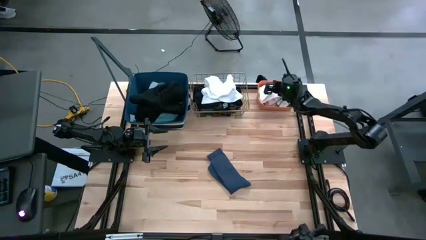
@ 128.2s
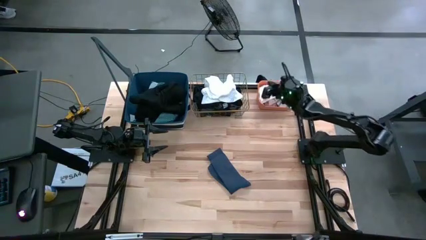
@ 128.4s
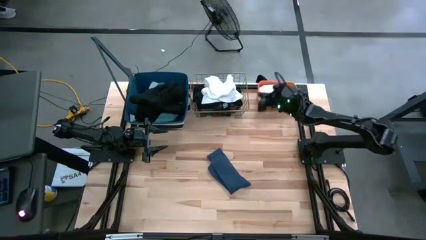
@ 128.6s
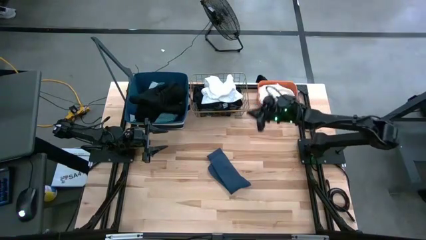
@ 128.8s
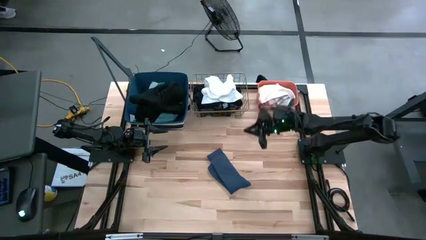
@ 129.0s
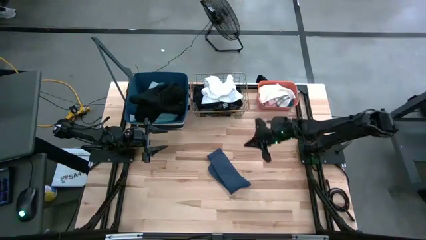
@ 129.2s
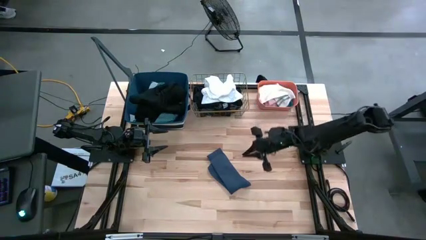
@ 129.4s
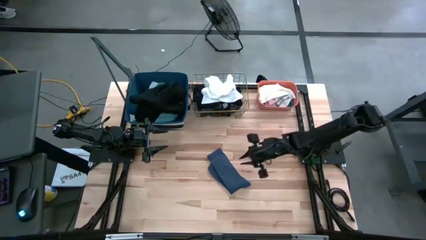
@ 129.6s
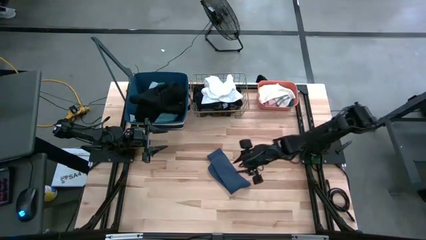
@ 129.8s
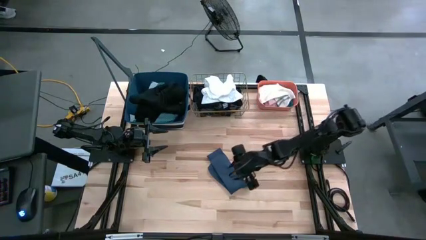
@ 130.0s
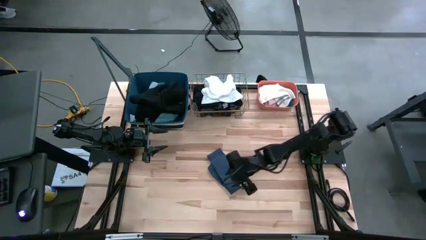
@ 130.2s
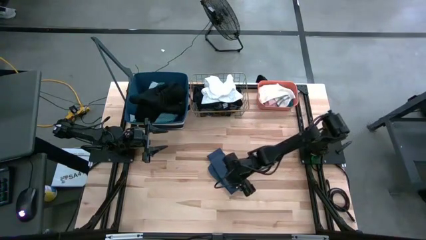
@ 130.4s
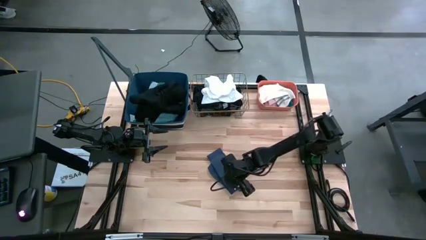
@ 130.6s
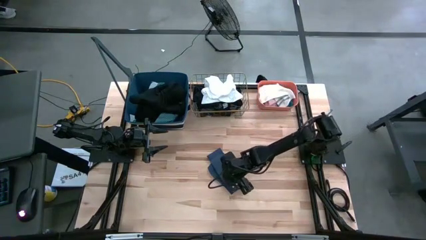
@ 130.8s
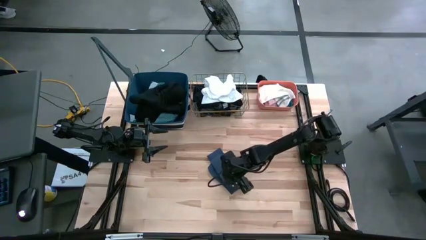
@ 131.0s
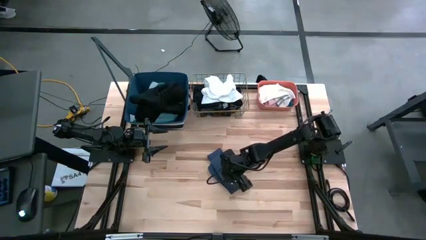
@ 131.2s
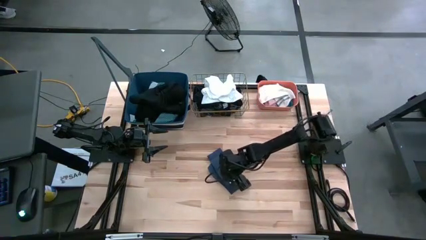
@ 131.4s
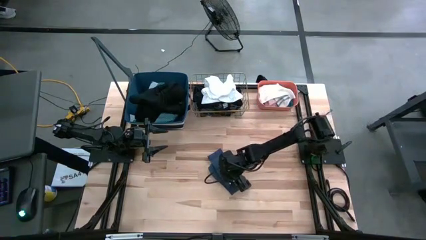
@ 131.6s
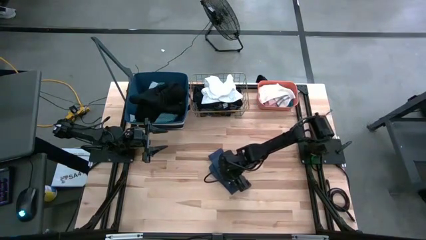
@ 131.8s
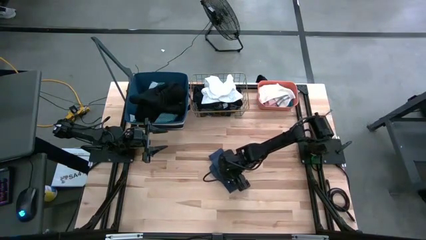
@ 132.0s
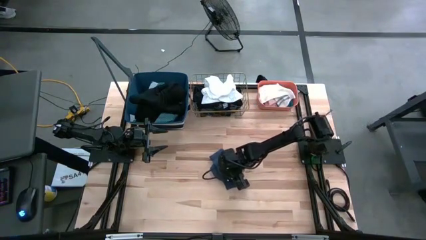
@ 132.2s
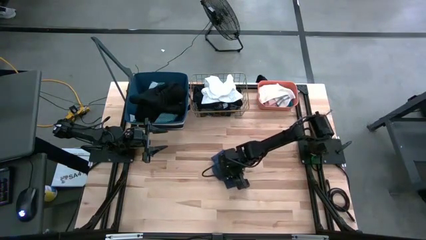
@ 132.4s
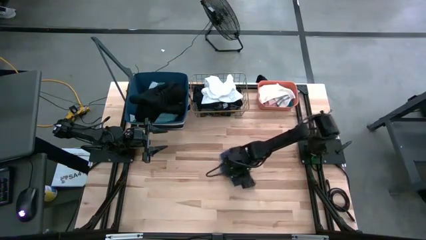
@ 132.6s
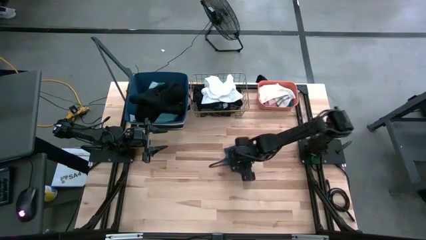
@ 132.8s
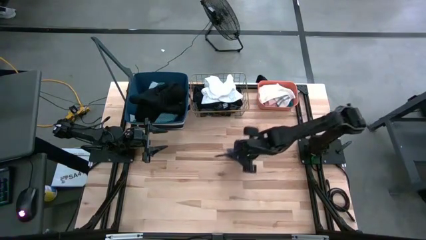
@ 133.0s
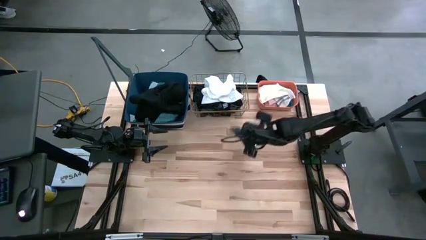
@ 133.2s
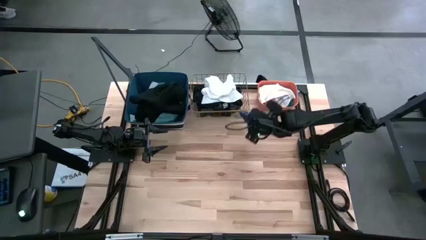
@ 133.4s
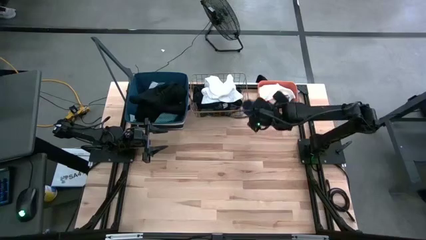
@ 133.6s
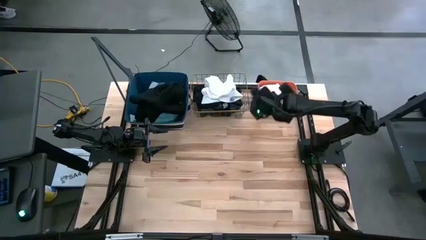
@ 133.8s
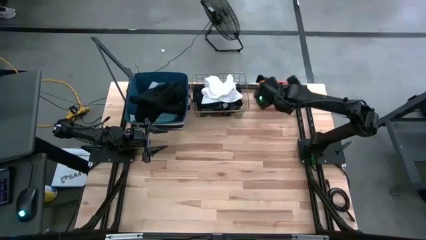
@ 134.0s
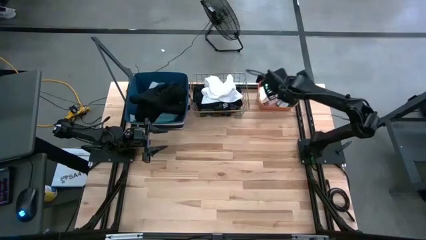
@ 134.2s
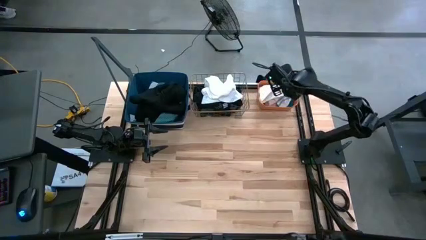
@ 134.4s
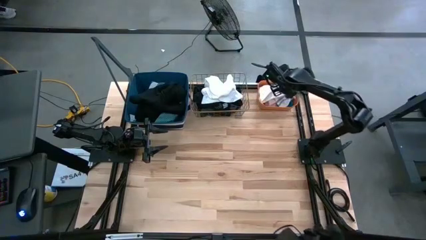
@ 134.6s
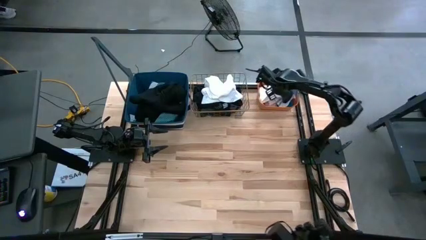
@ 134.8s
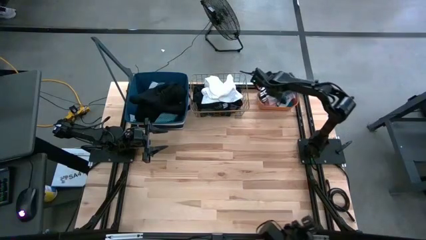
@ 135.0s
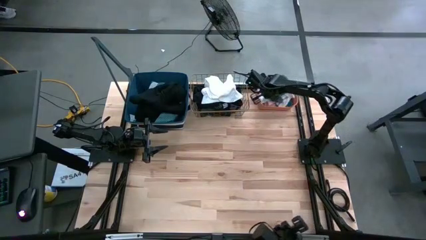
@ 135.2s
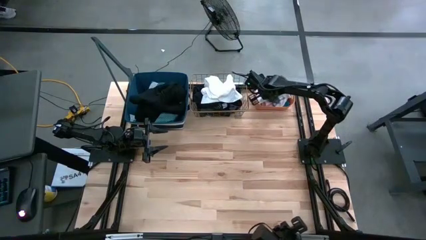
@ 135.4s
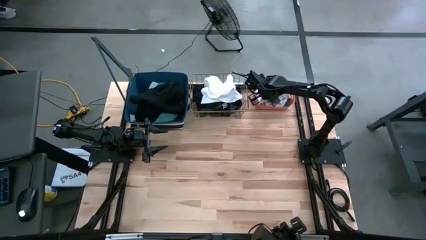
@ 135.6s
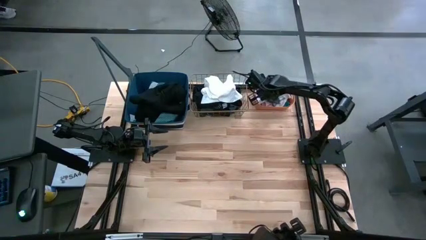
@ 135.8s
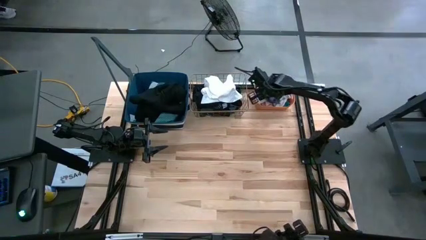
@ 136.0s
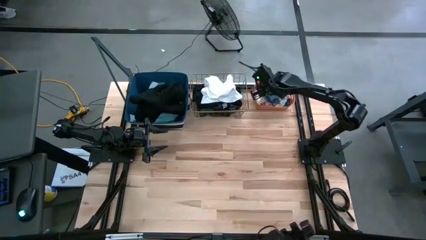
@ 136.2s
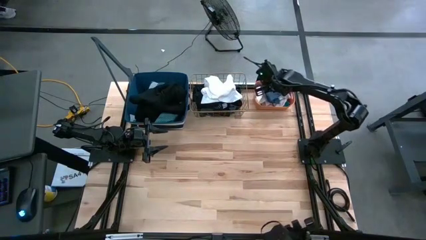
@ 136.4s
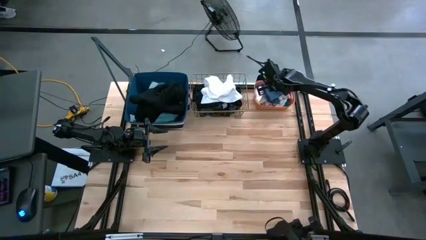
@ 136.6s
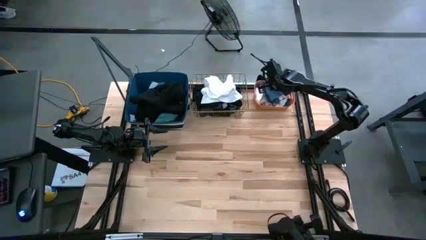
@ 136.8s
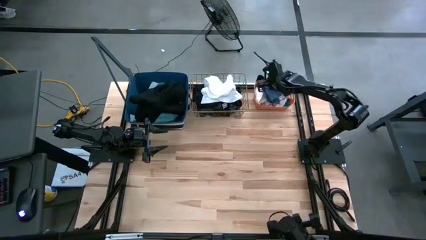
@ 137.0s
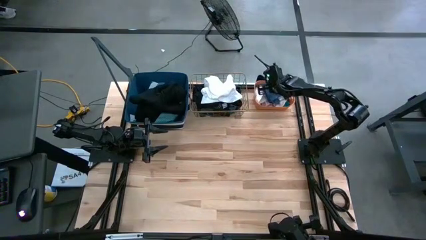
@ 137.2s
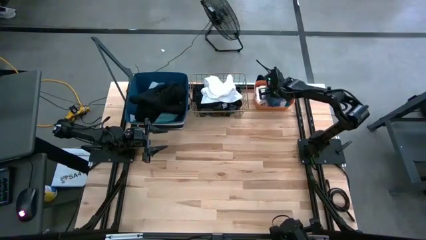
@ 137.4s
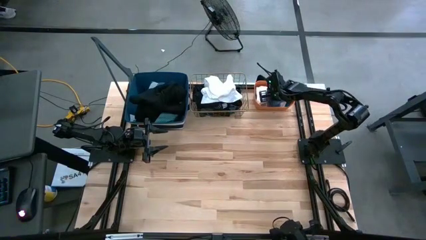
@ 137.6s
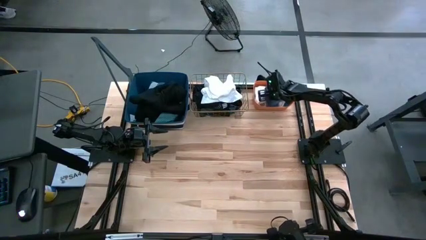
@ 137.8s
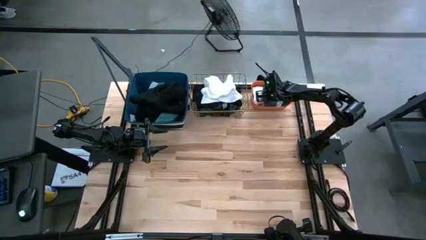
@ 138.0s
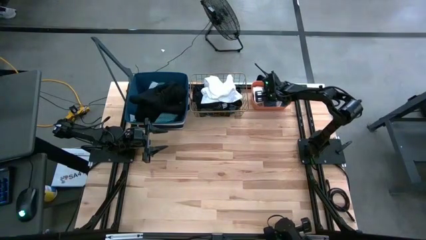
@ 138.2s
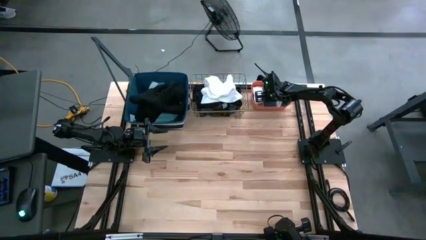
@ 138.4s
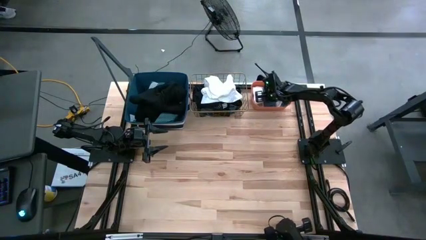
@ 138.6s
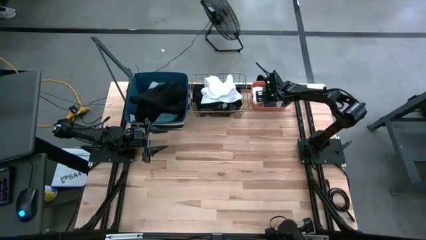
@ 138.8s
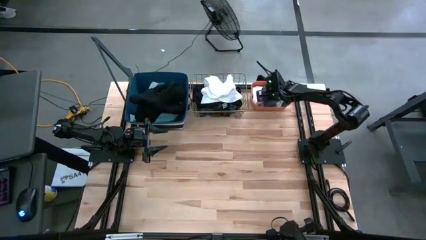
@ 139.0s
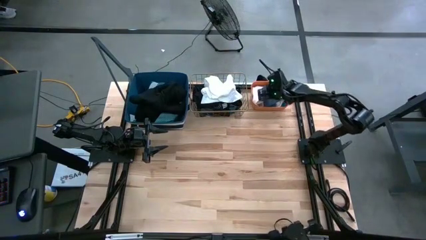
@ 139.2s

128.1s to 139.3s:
Task: Pick & Place Cloths
Put the dark blue sock into the orange bin

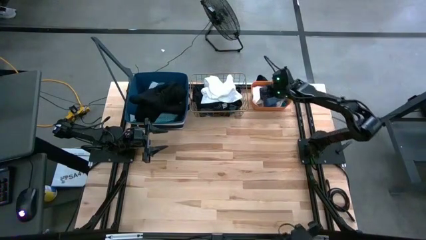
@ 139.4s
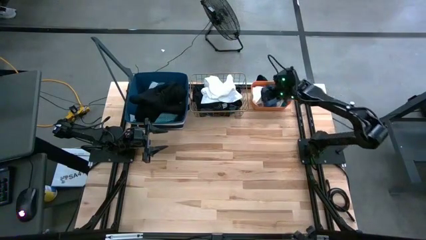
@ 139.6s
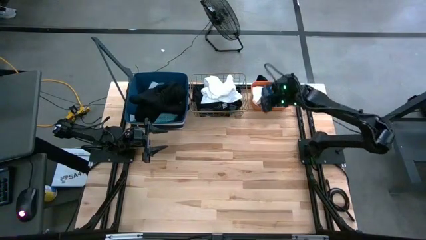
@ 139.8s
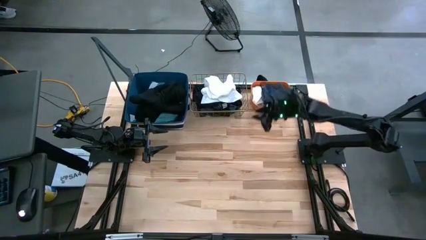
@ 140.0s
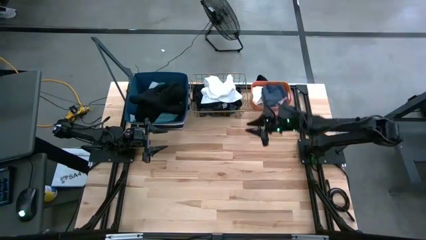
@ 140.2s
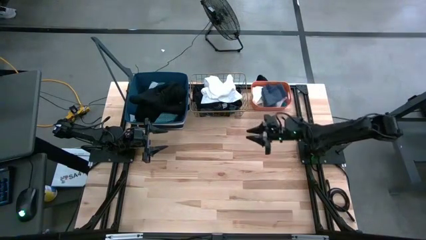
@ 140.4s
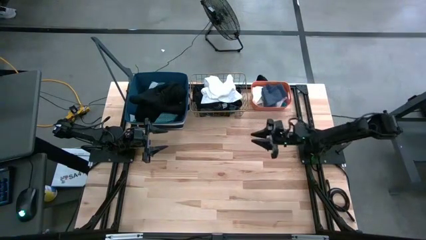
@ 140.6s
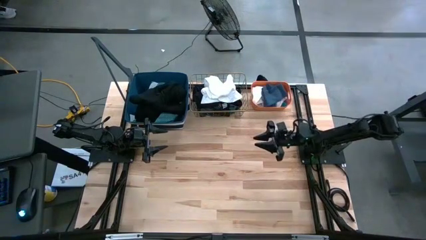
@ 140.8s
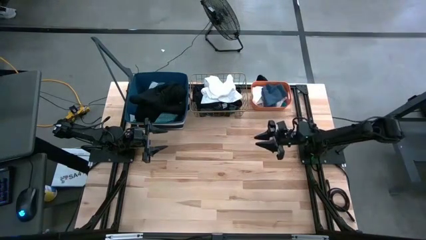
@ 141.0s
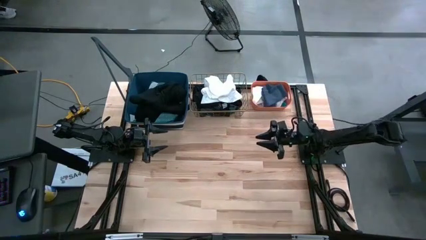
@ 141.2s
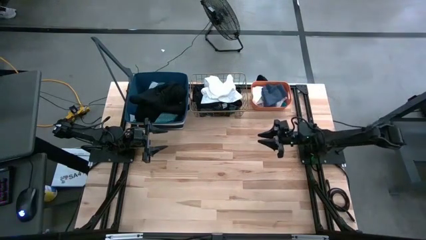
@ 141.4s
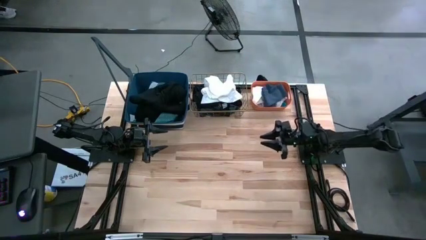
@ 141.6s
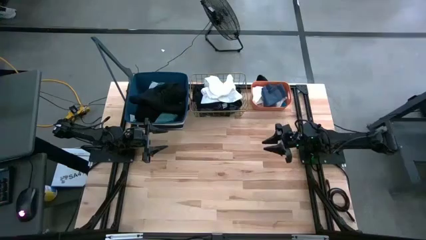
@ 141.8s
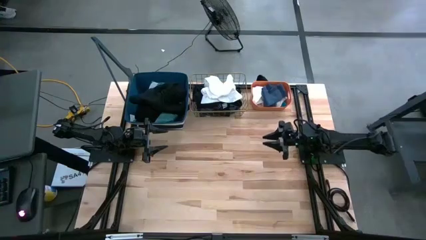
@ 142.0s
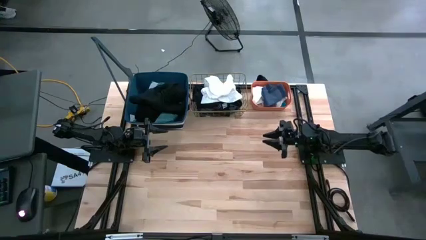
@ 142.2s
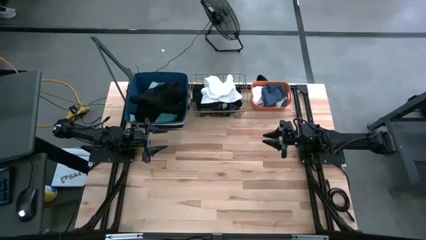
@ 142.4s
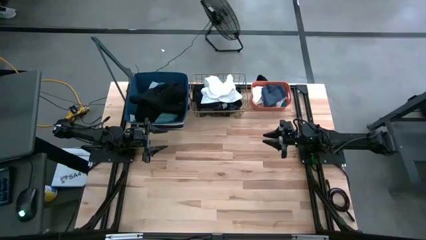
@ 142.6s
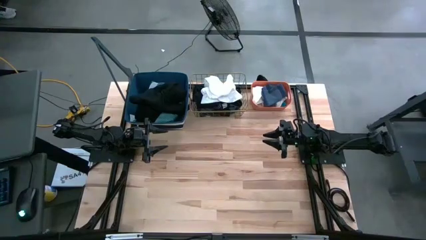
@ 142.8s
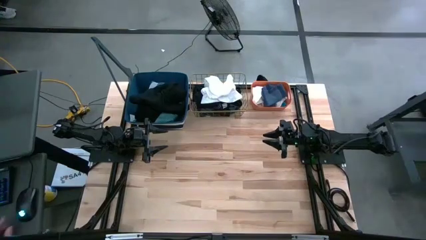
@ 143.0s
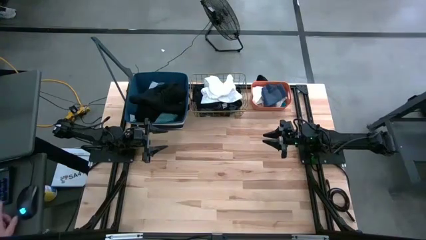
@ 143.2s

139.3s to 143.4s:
Return to Home Position

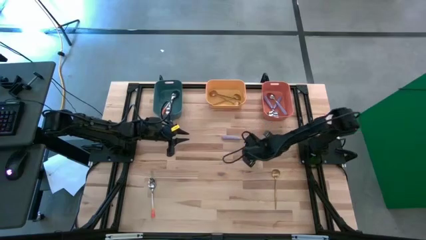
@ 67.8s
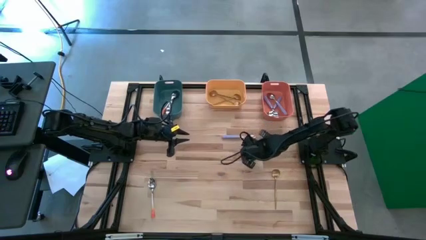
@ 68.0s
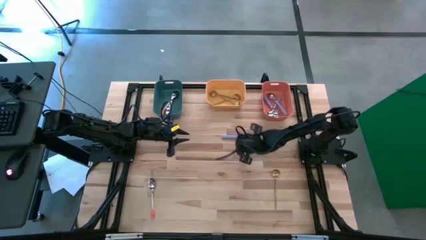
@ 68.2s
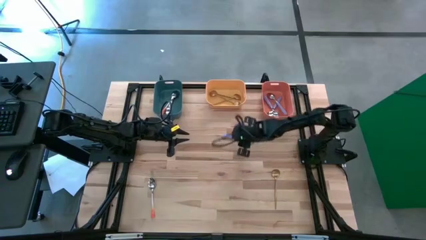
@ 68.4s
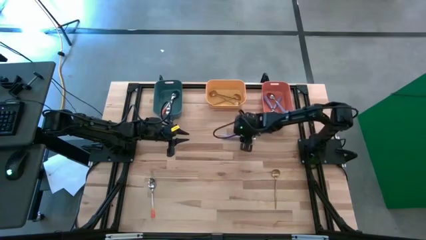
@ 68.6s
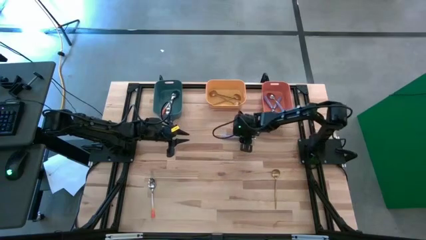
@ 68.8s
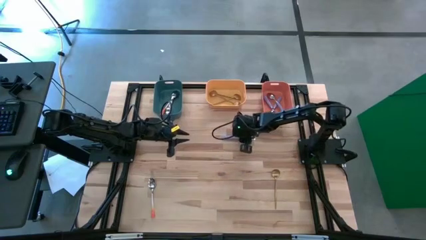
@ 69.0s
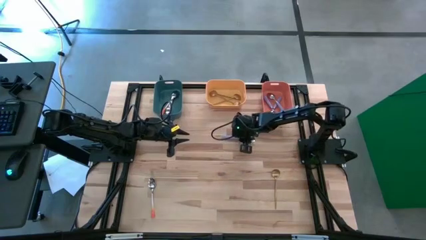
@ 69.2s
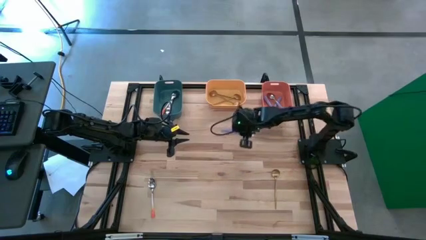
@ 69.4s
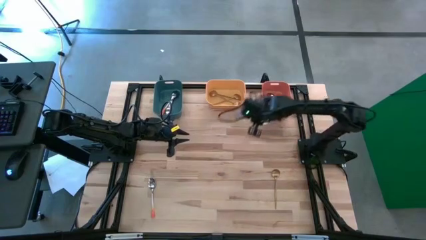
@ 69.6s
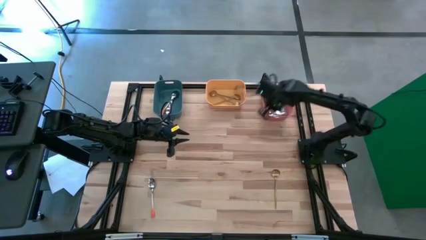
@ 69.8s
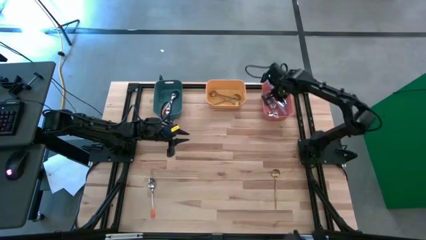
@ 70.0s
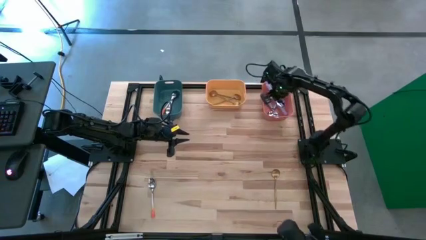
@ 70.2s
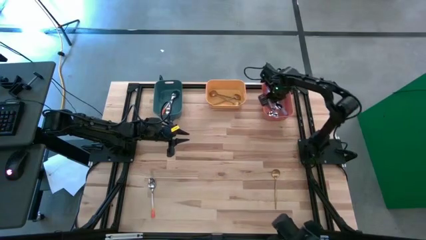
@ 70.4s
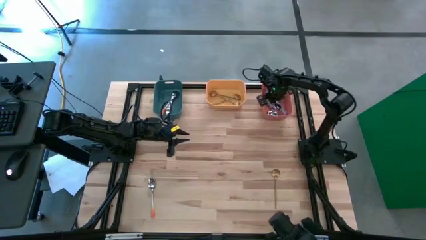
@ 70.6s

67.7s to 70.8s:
Task: Sort silverware by color (type)
Put the purple spoon into the orange bin
